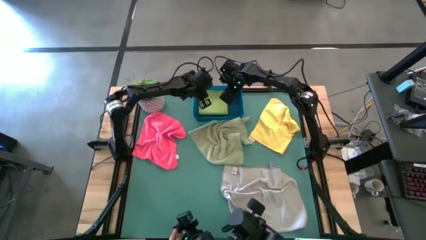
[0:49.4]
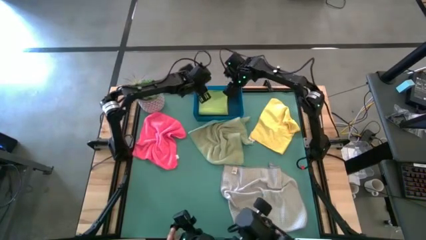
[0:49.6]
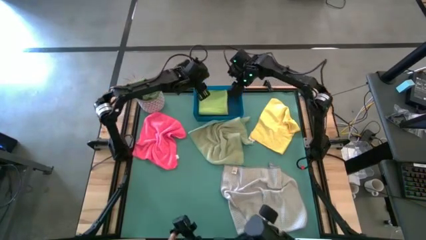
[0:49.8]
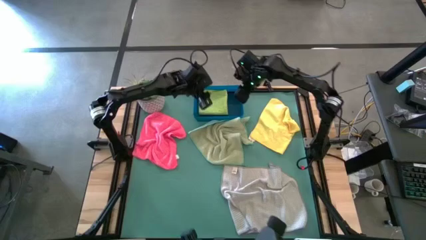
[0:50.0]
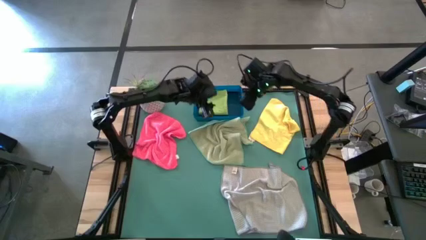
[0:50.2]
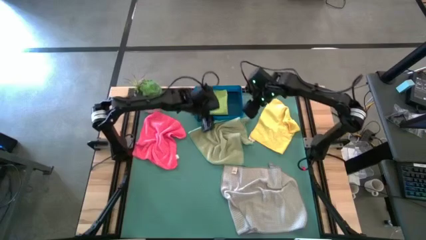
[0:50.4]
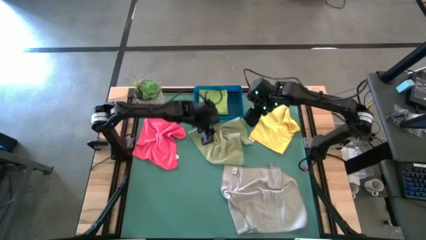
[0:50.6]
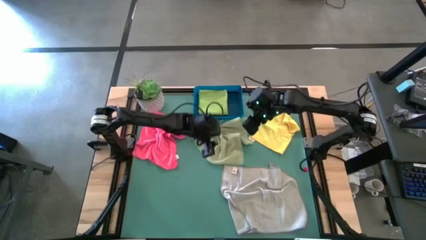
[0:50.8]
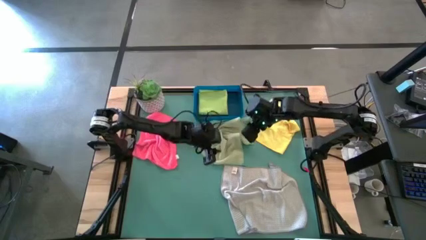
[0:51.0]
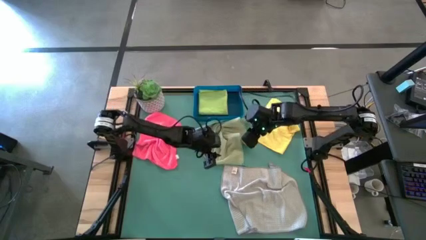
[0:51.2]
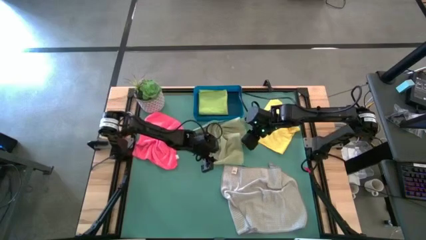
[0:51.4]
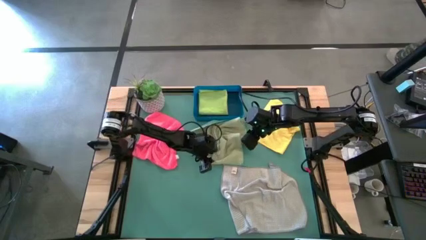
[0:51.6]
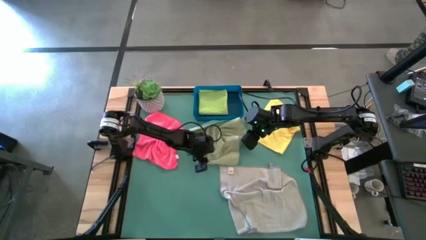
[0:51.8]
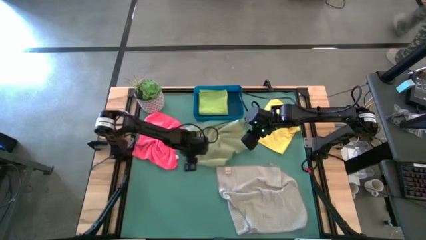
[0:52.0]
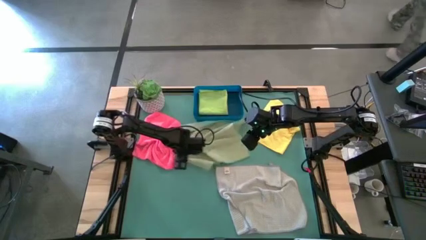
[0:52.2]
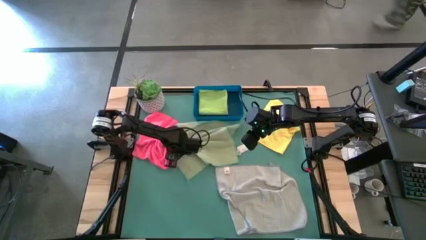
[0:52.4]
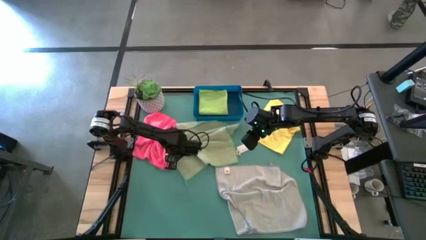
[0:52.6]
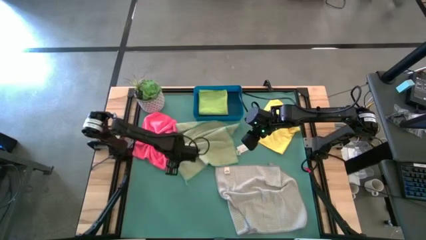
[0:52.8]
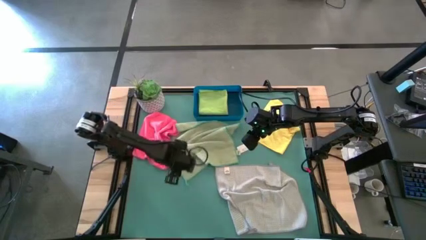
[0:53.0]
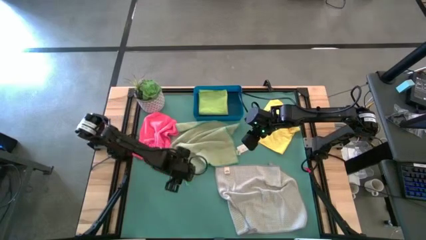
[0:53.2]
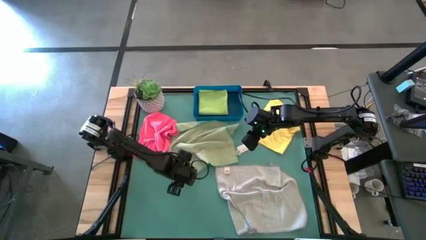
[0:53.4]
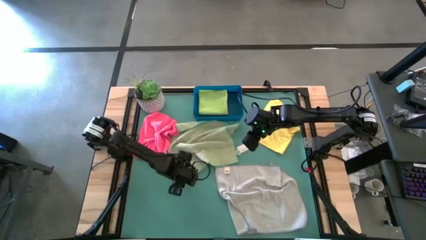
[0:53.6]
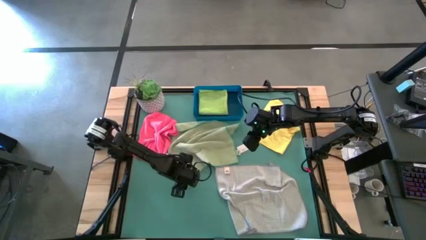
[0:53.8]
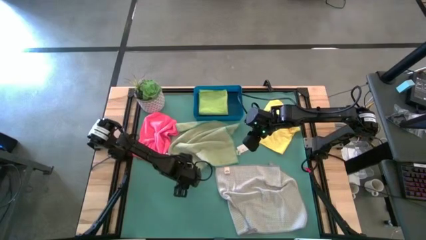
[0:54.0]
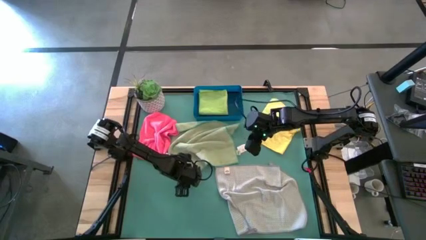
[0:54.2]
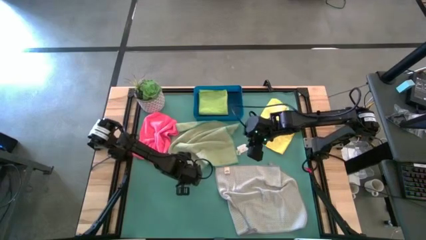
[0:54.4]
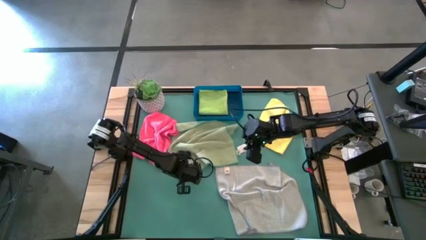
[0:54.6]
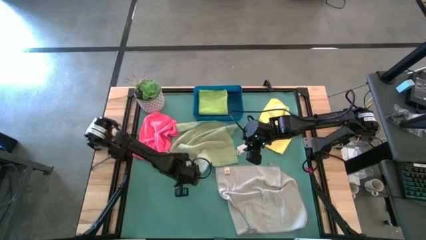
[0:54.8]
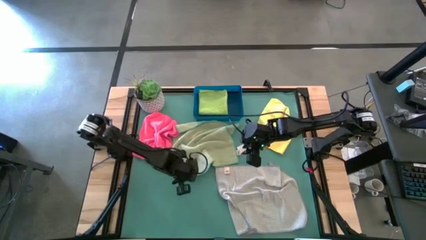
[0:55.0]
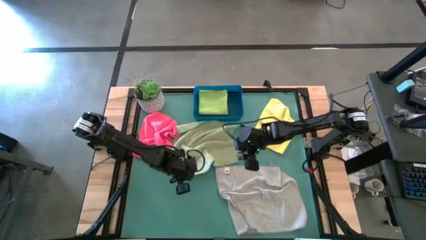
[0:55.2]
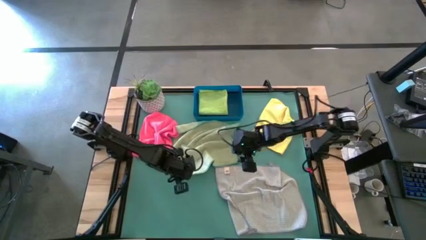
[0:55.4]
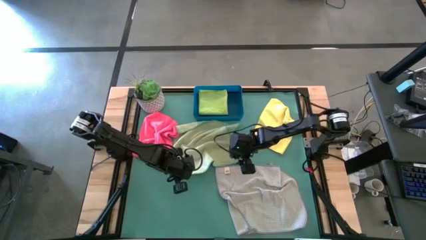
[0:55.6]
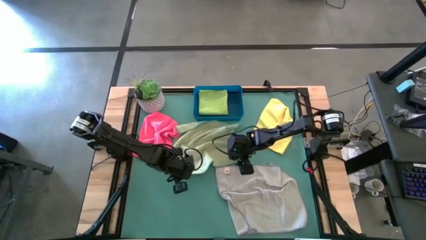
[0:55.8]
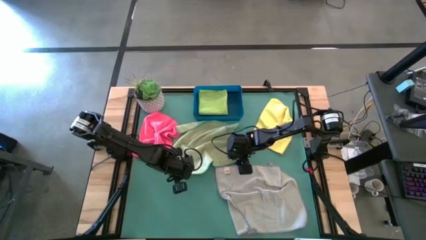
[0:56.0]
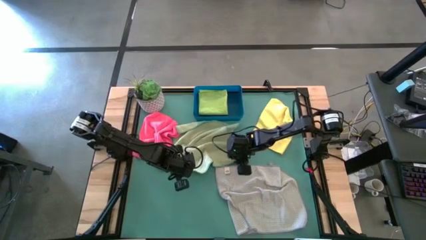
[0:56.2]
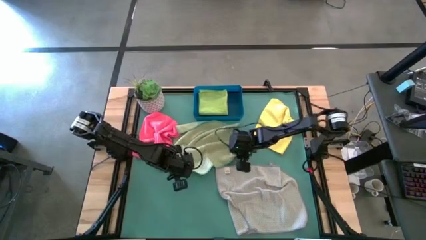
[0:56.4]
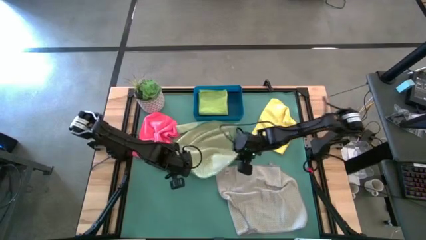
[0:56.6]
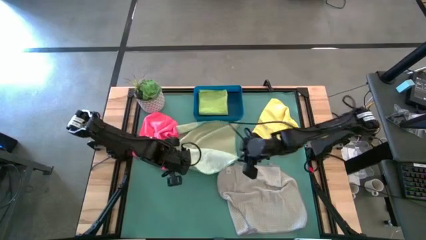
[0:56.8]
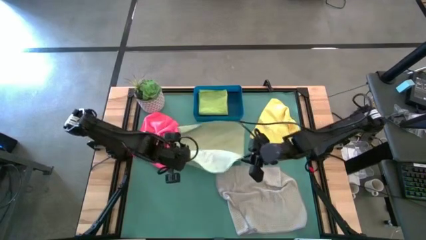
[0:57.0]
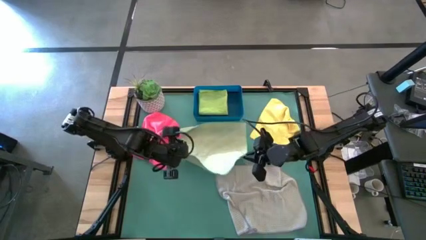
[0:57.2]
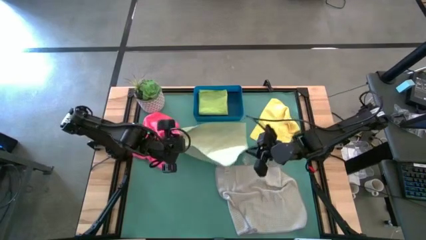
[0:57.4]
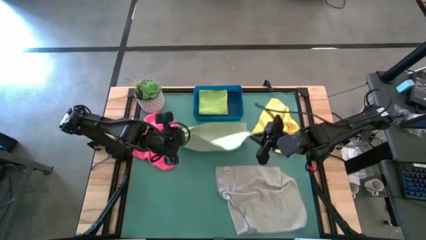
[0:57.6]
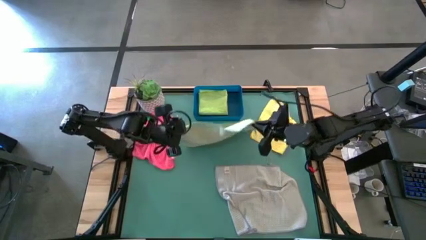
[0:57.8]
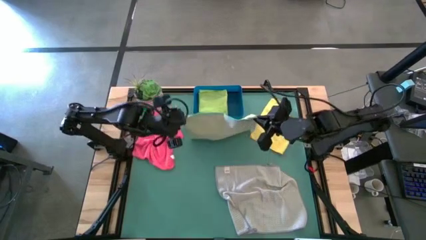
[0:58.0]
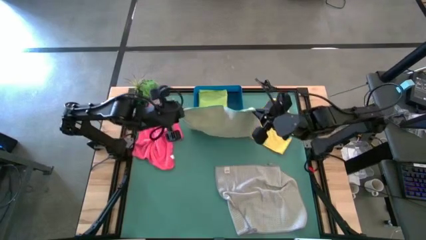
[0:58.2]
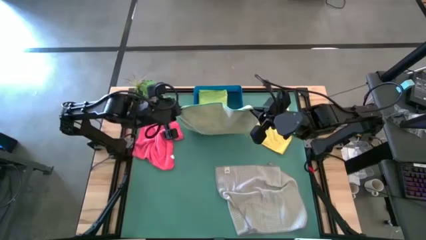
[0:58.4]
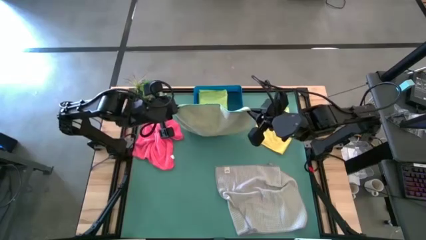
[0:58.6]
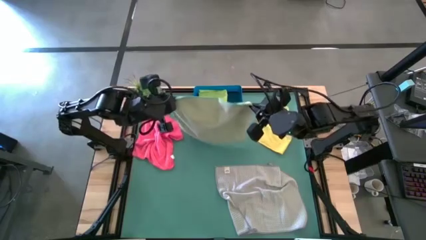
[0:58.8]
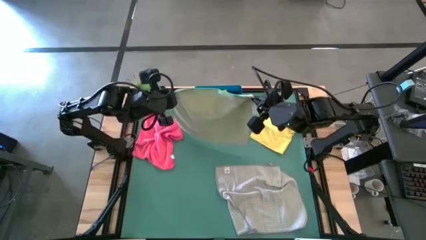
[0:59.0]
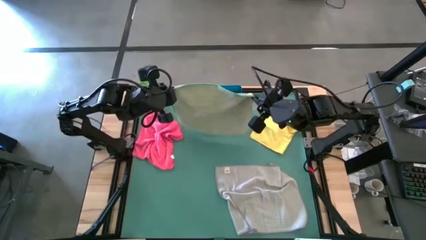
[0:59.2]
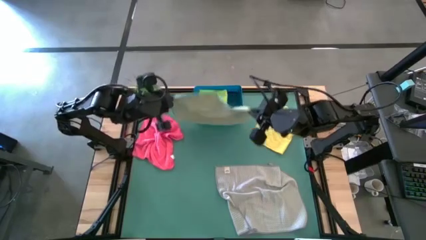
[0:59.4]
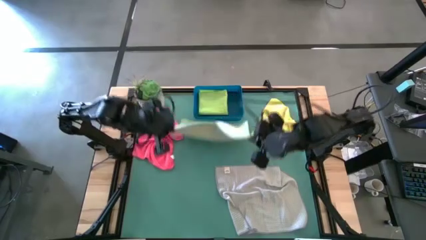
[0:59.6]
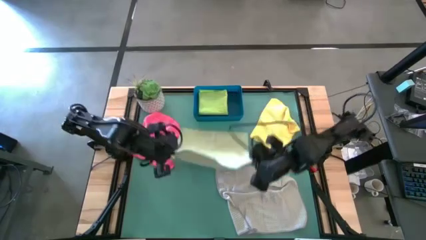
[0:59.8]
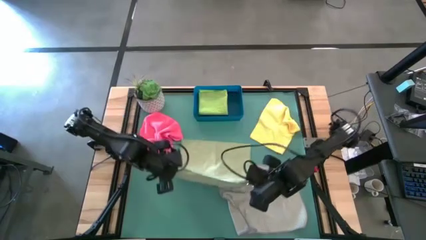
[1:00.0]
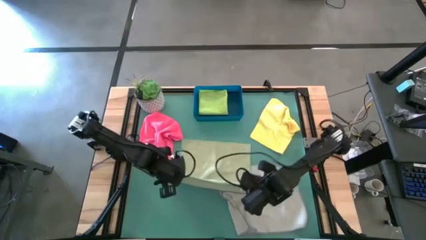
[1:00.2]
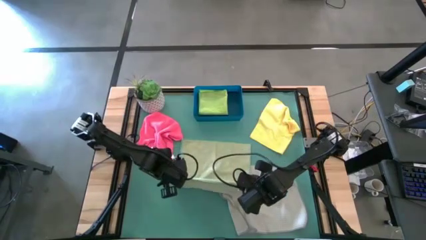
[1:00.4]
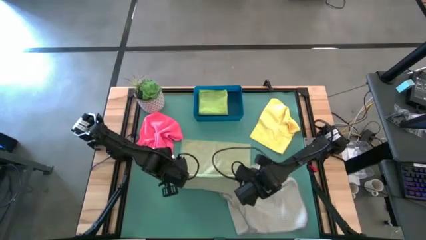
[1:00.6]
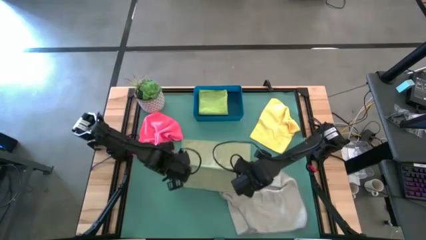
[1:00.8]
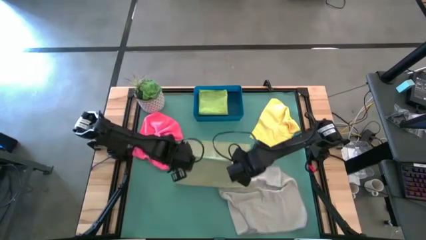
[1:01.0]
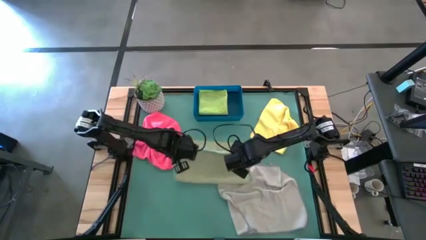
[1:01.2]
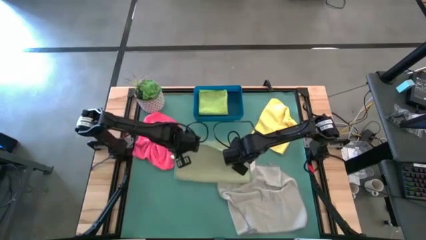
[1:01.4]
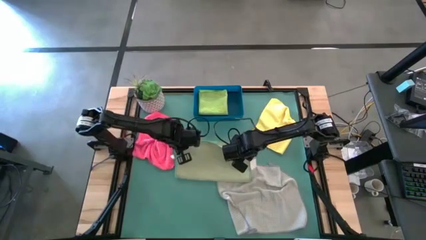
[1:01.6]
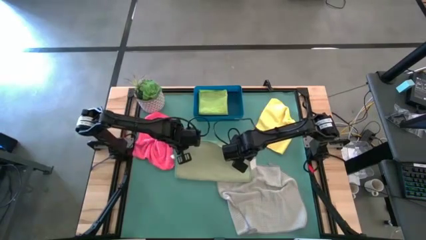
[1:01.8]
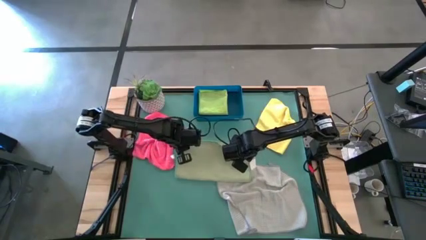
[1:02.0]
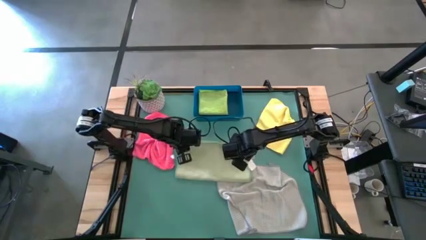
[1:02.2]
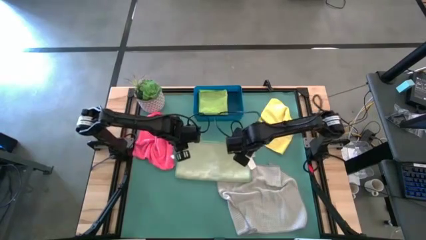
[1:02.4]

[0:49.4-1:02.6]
Task: Fold microfiber towels
Fold the light green microfiber towel

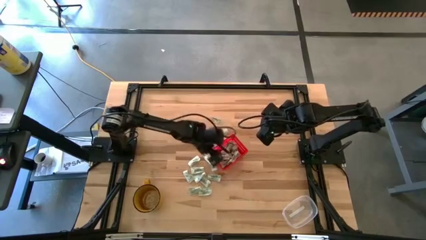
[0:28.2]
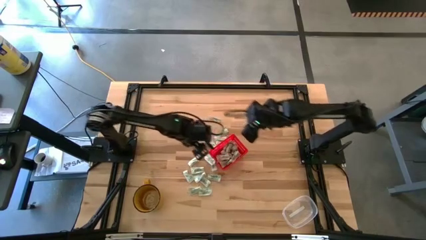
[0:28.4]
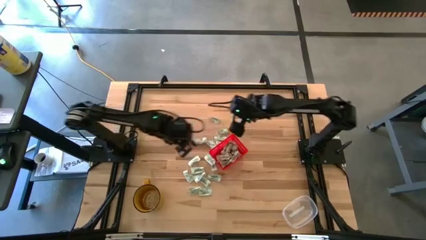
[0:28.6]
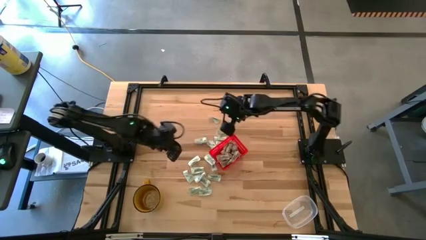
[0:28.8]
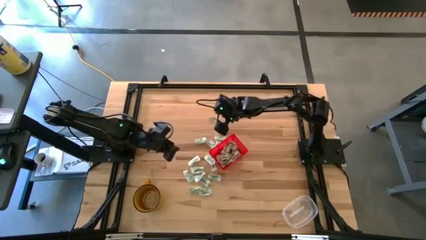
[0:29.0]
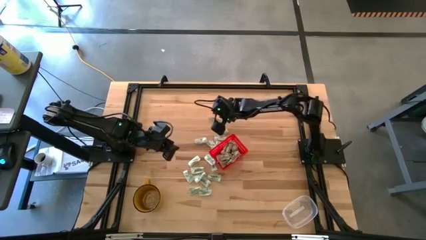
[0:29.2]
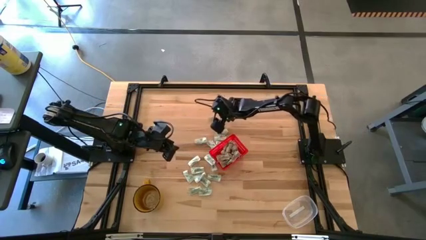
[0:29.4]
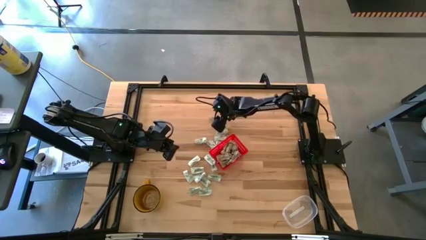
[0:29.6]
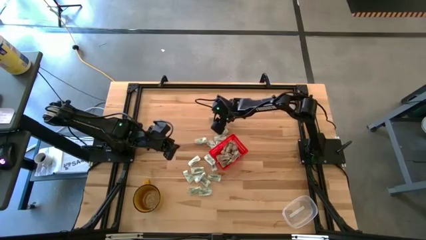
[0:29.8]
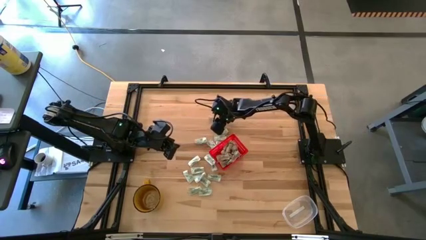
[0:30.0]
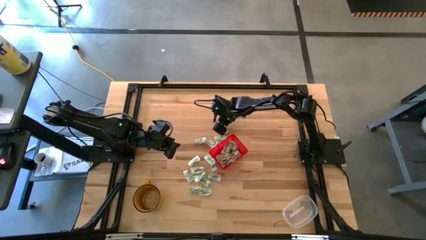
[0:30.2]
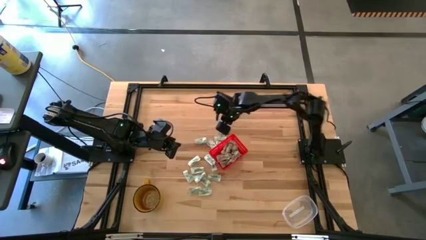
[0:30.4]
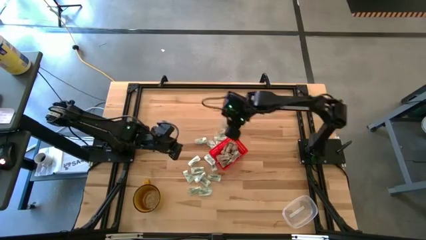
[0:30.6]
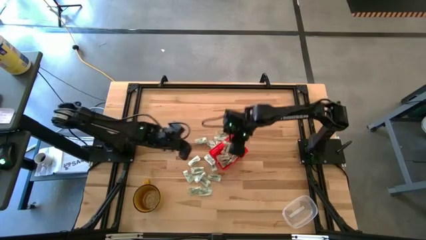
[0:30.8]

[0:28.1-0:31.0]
Task: Pick and place items into bin
Put the light green stevia packet into the red bin
